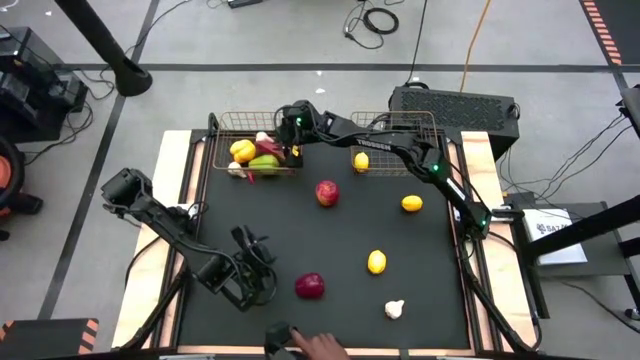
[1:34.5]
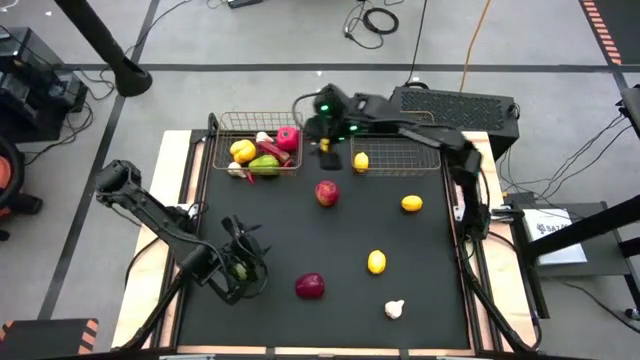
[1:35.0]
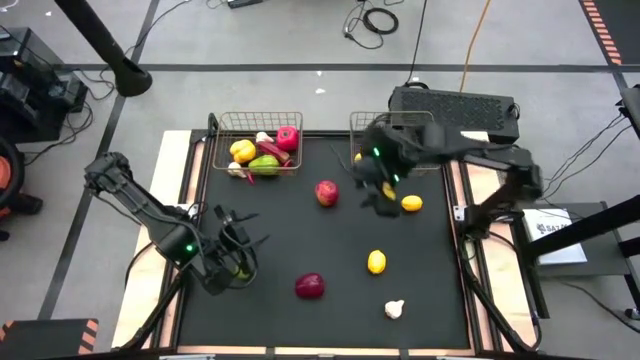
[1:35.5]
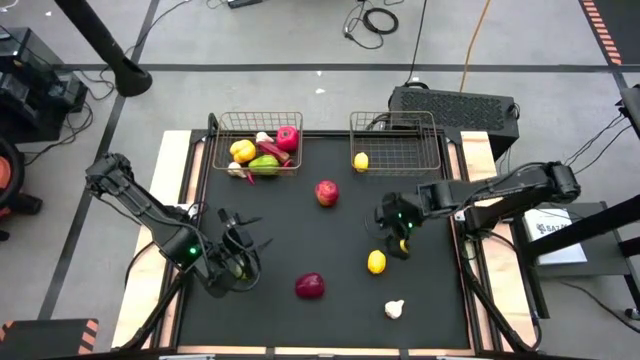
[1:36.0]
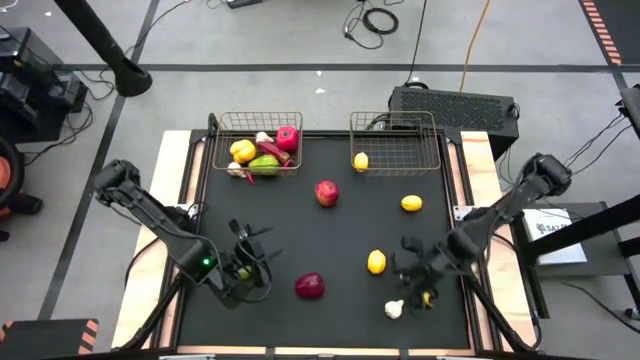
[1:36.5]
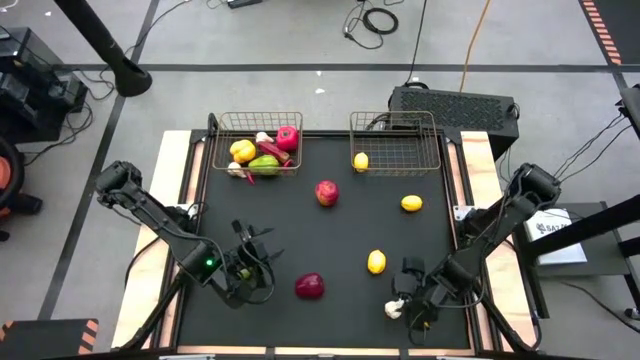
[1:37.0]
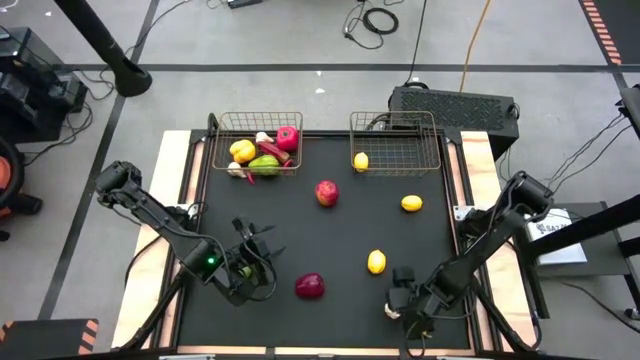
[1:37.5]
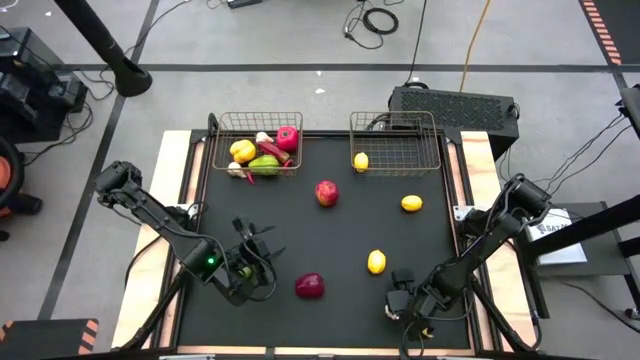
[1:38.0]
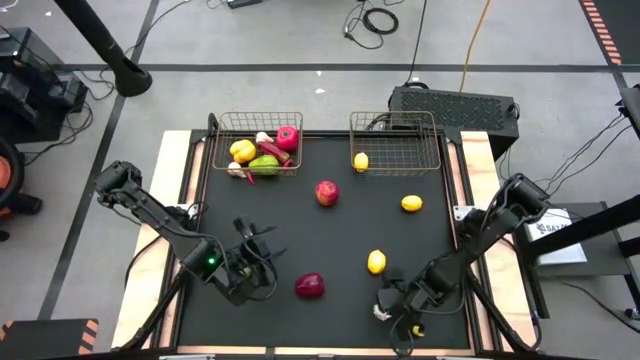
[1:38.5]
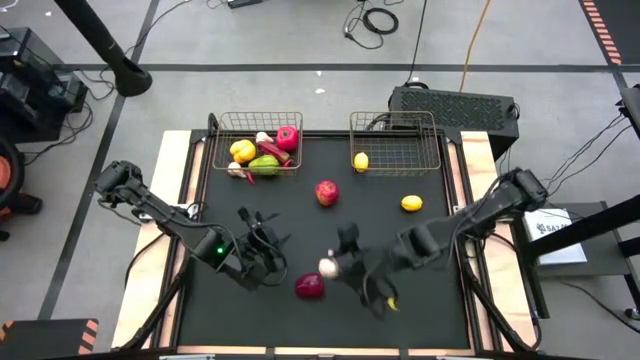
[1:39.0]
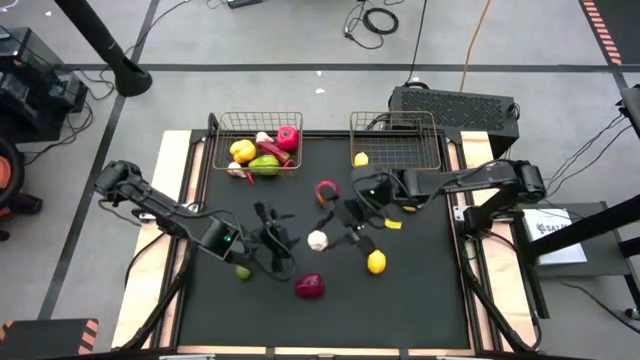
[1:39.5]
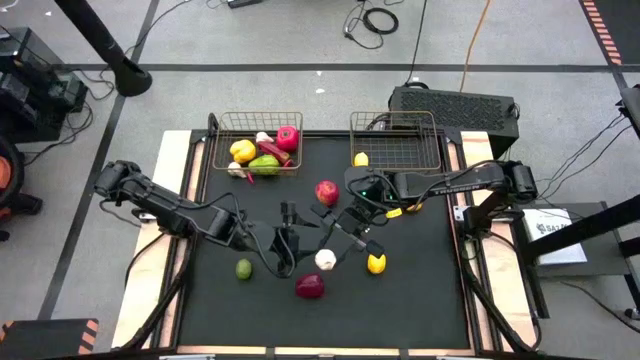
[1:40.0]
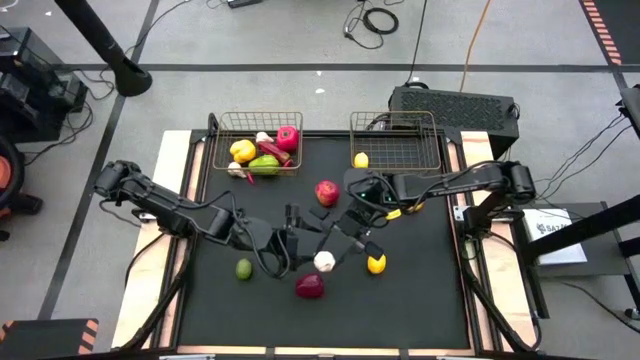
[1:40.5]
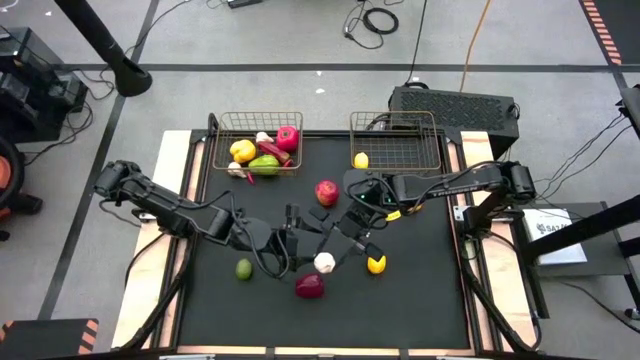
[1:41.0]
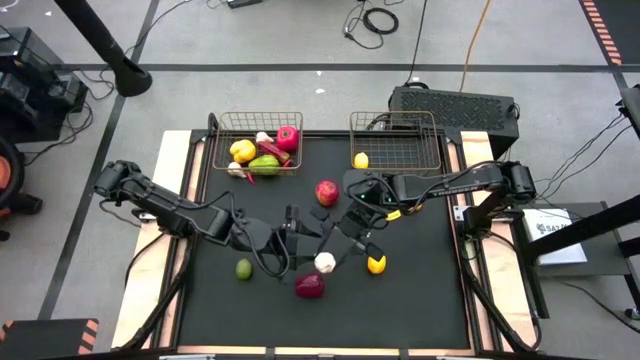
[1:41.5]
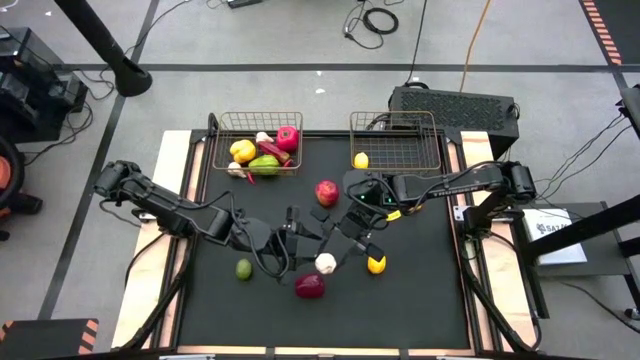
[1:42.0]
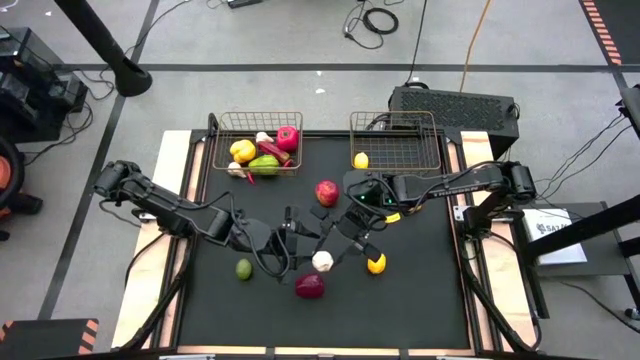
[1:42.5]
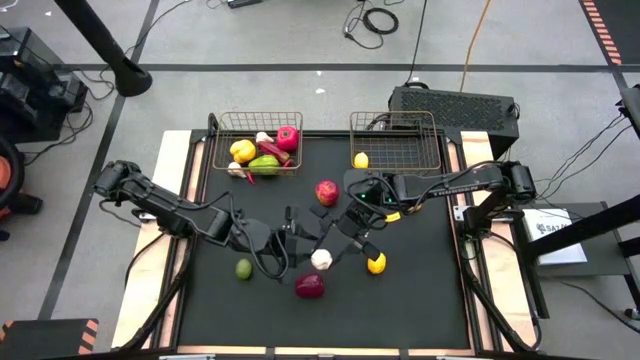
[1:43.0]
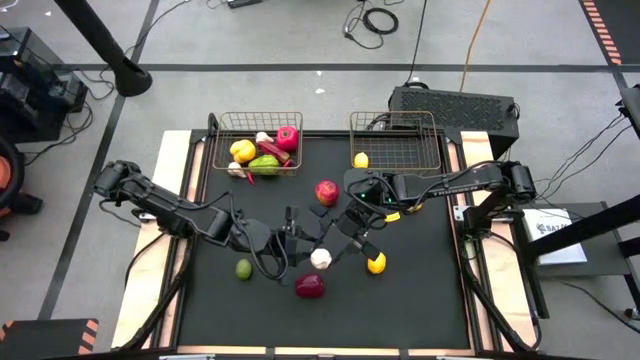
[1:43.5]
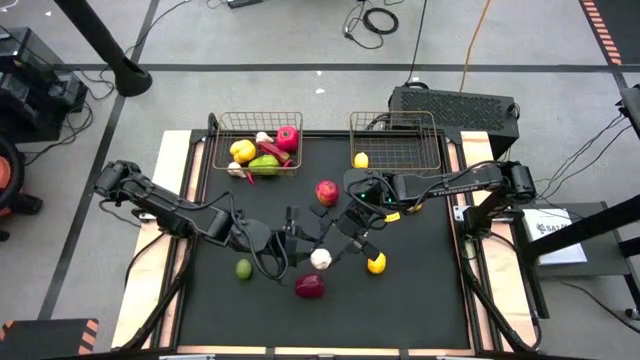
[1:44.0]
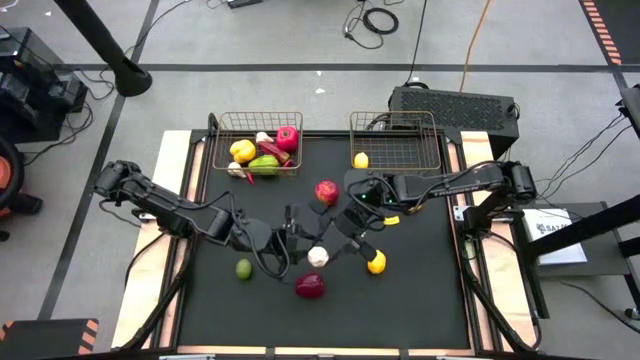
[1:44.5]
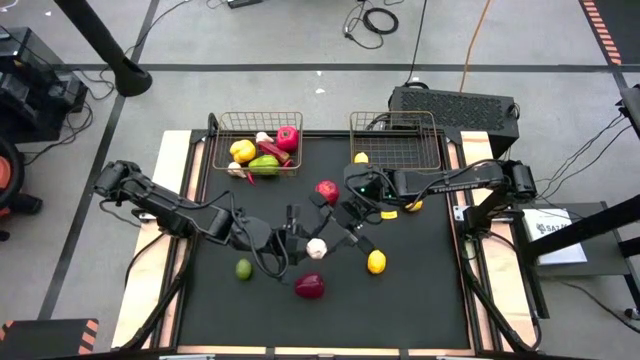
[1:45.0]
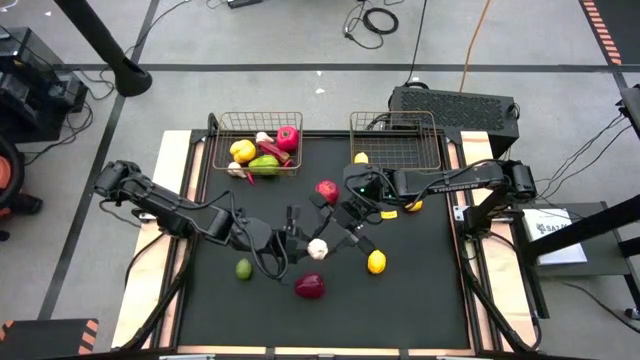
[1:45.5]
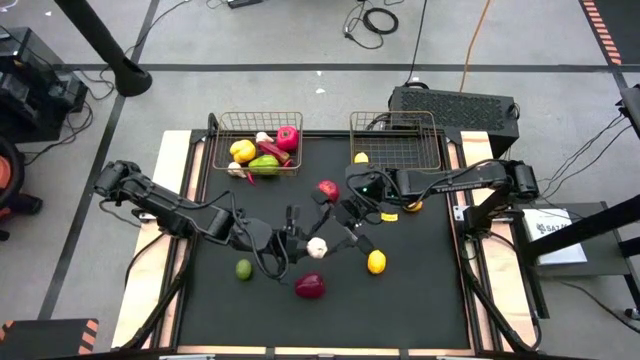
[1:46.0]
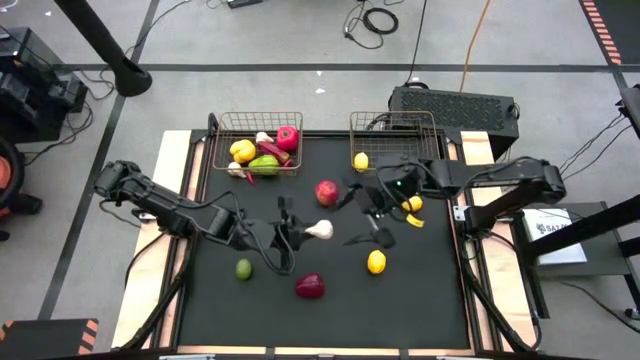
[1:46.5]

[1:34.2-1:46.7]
Task: Sort produce into baskets
Put the garlic into the left wire basket

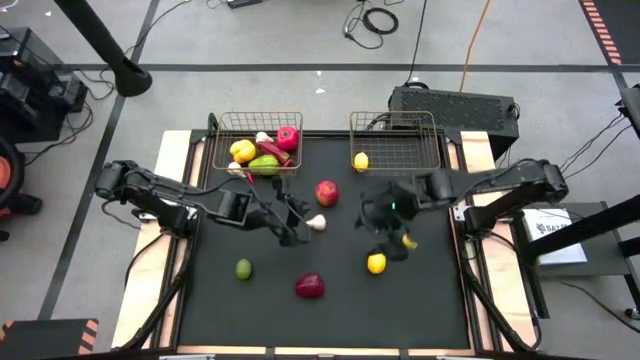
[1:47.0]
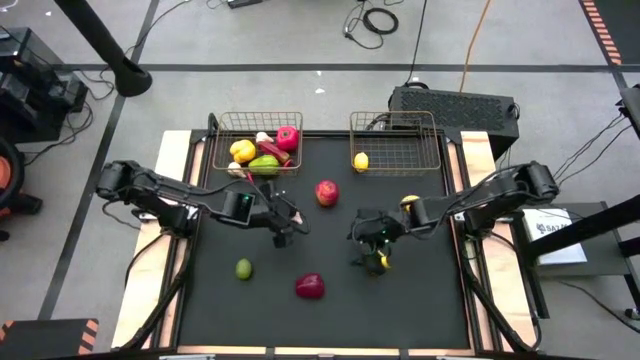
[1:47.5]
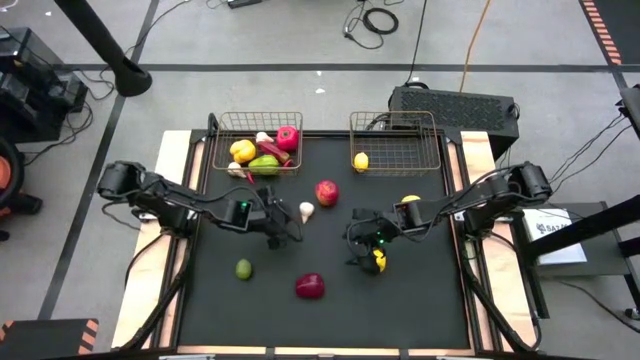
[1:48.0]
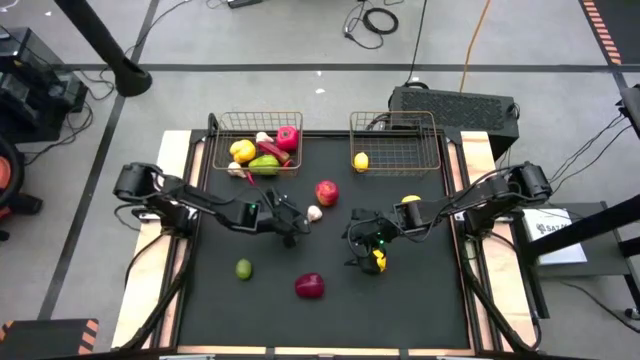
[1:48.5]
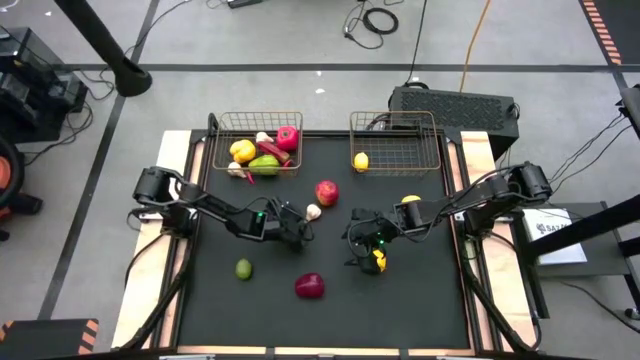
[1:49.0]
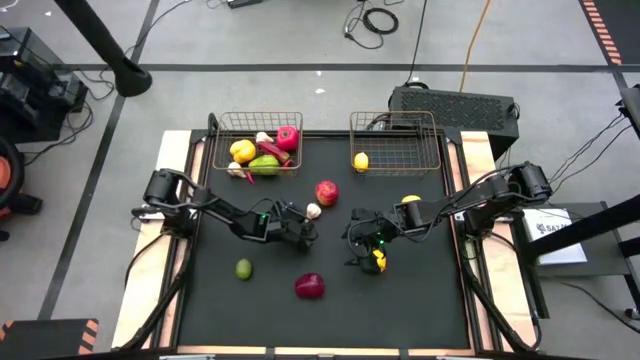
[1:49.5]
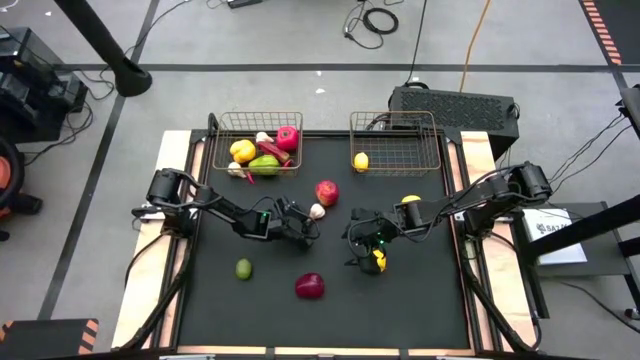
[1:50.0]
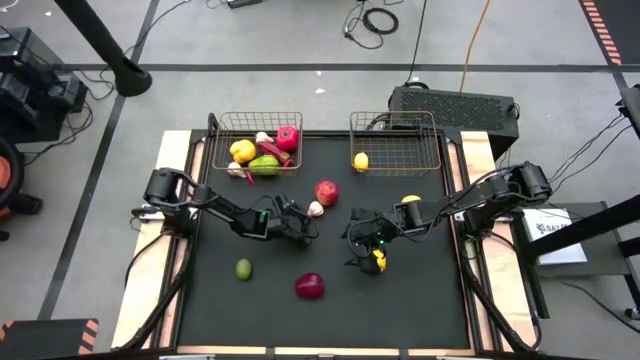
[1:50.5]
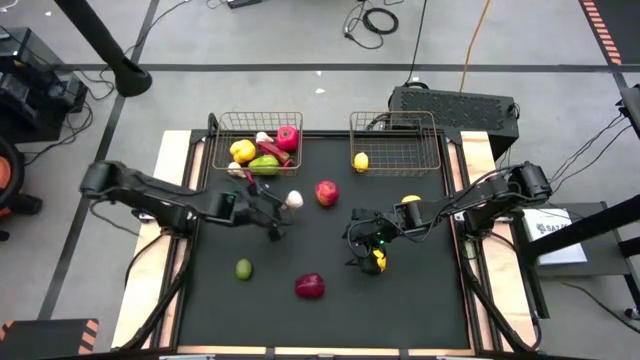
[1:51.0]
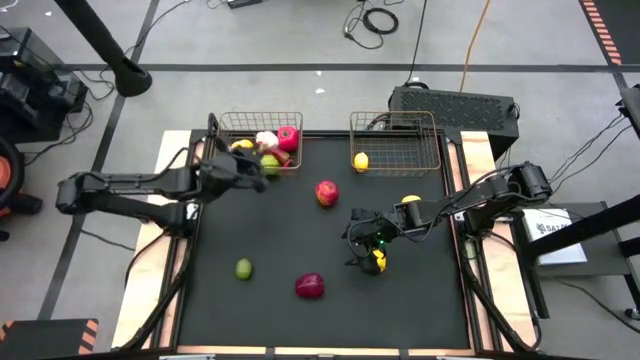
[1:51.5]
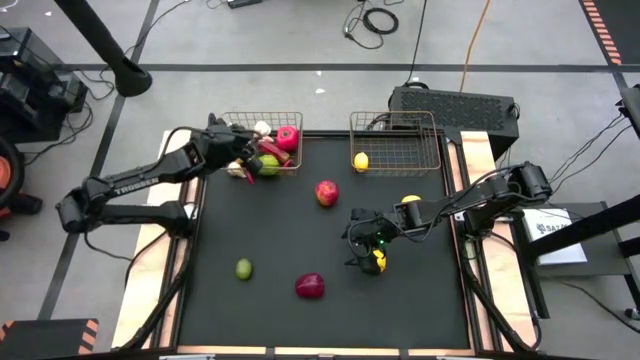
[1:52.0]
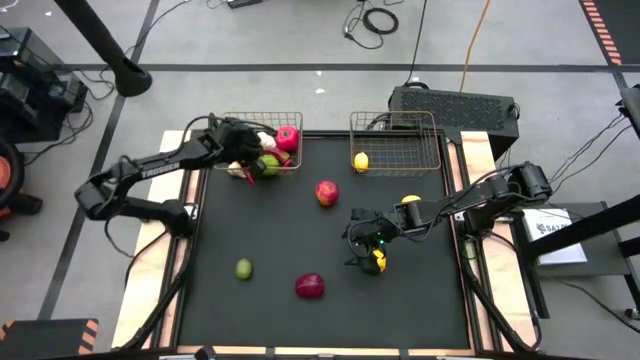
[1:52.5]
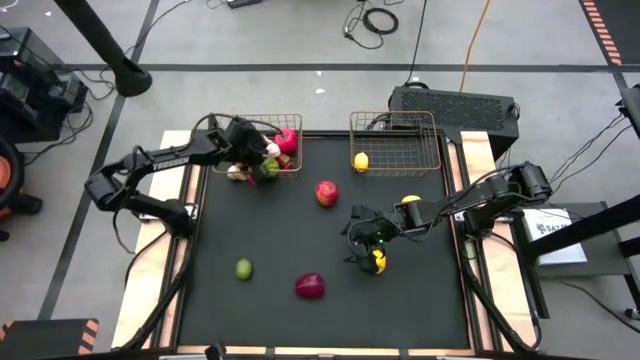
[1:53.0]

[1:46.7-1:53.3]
Put the garlic into the left wire basket

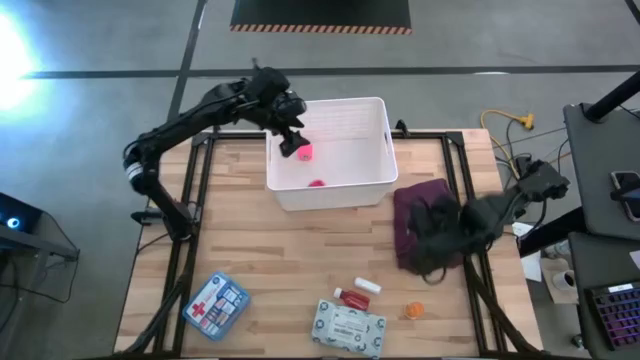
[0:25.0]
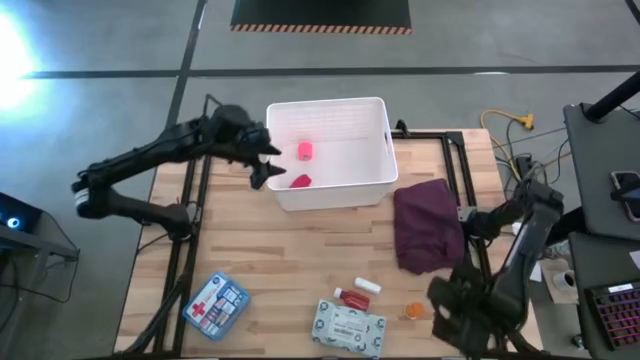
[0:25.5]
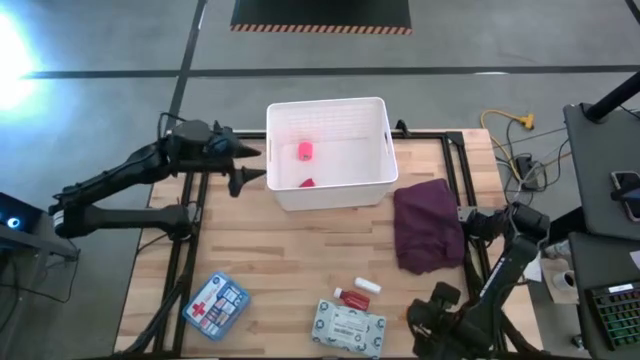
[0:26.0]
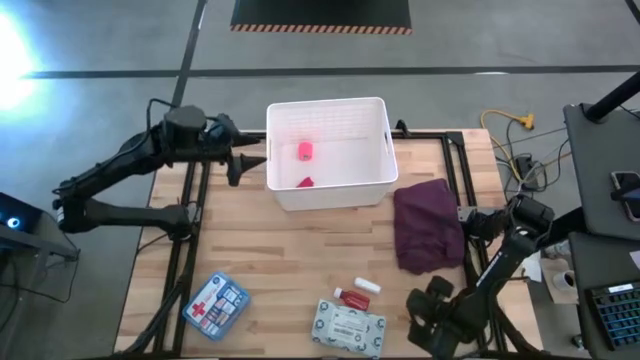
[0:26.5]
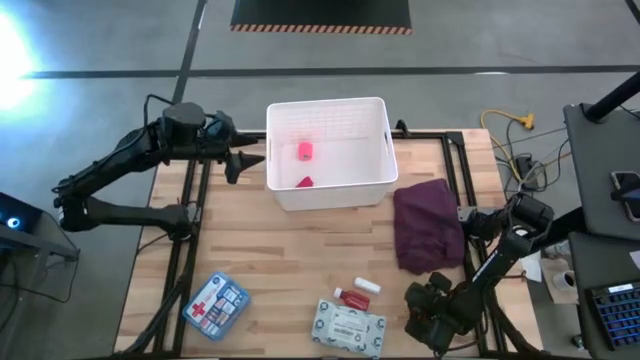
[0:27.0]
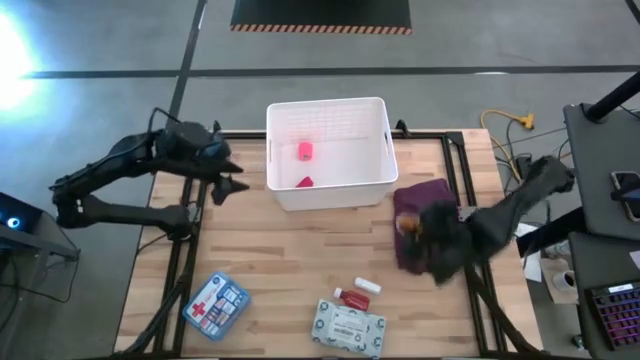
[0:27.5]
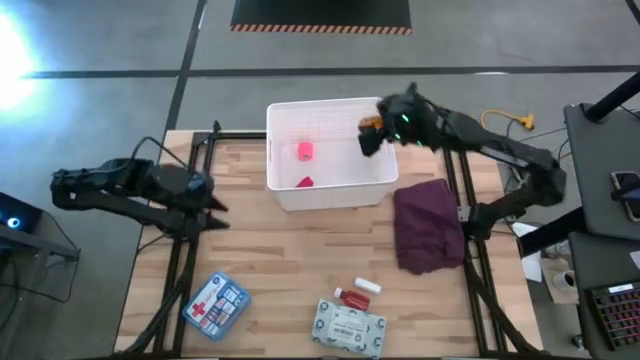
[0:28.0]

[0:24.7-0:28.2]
Task: Pick & place medical supplies in basket/bin
Put the orange pill bottle into the white bin
